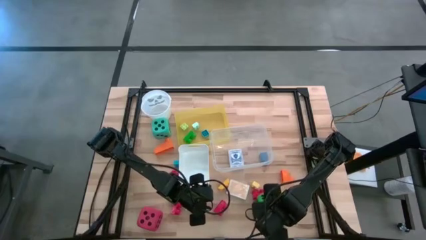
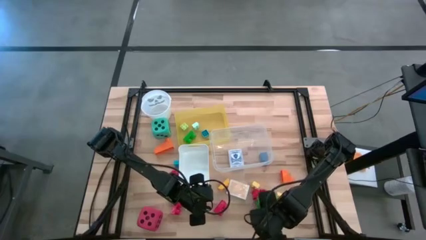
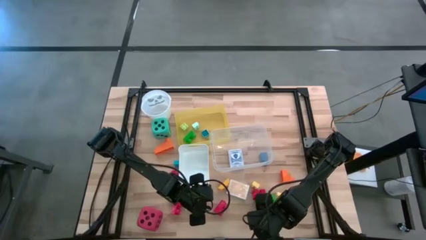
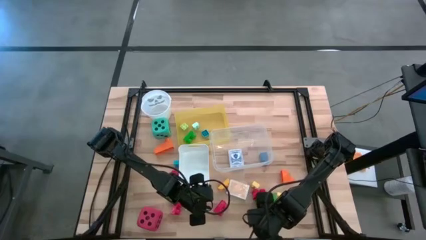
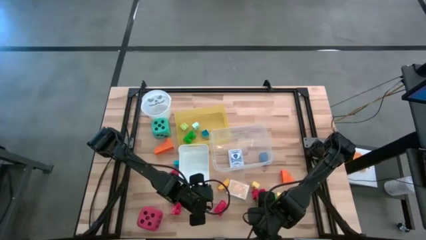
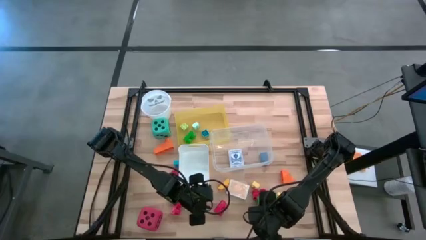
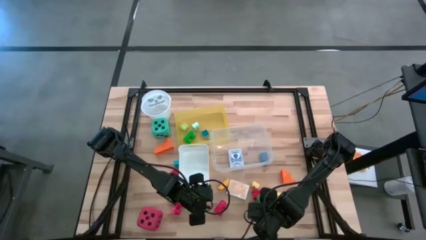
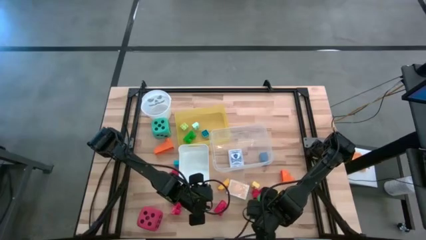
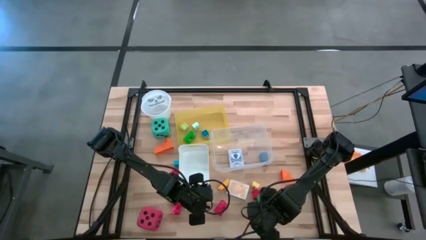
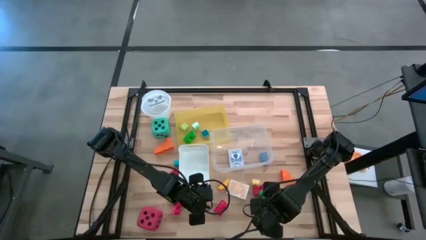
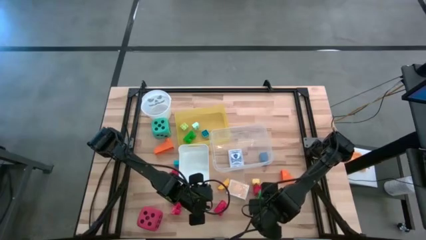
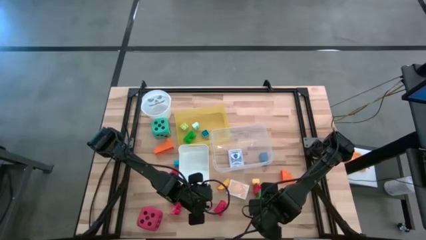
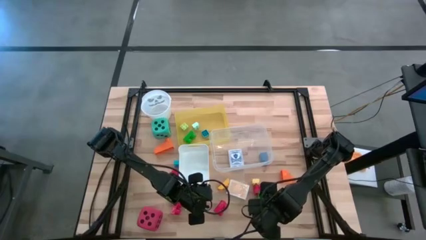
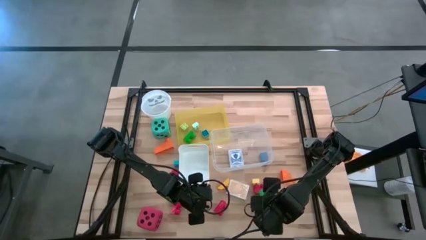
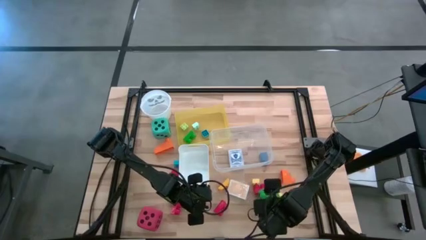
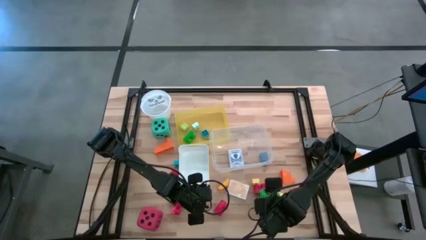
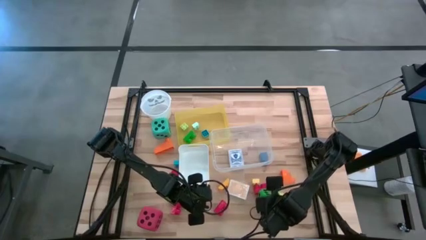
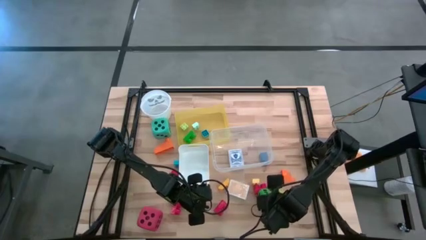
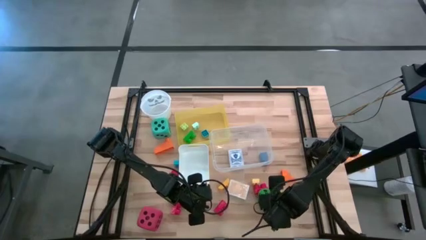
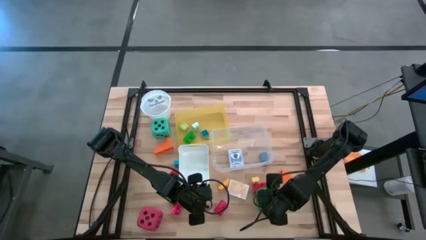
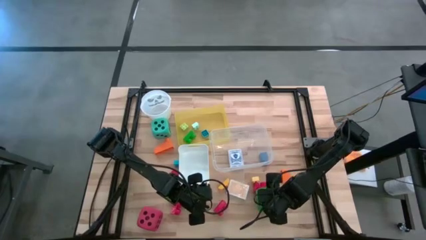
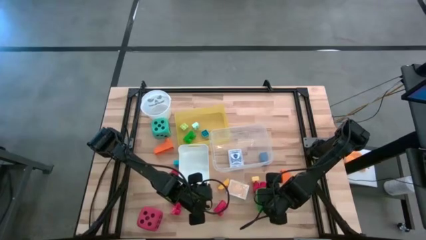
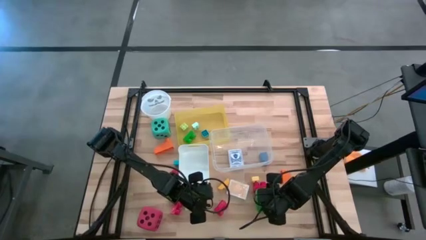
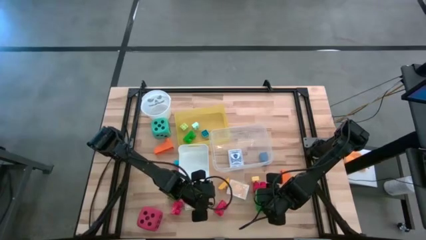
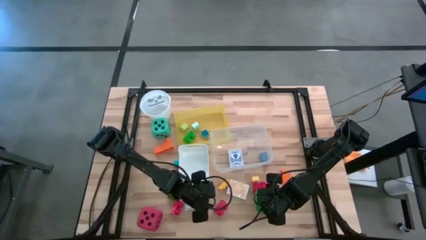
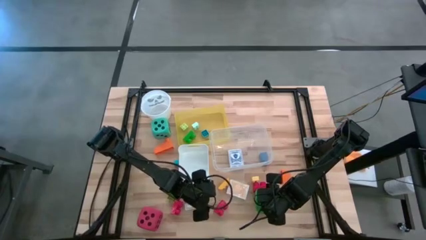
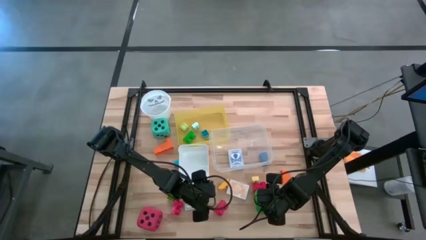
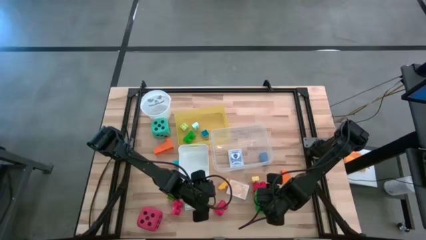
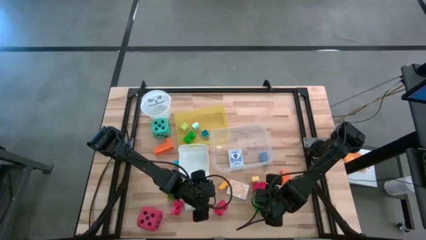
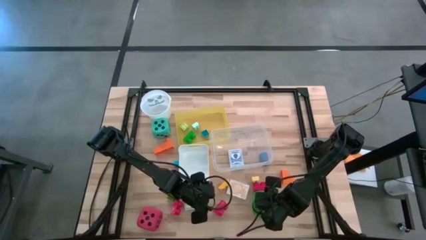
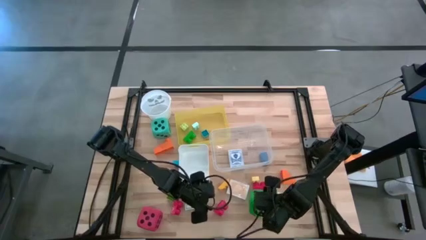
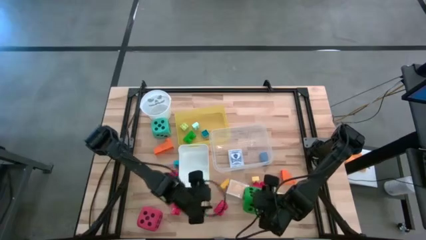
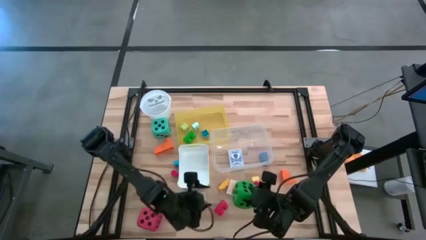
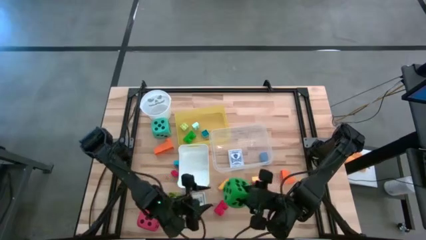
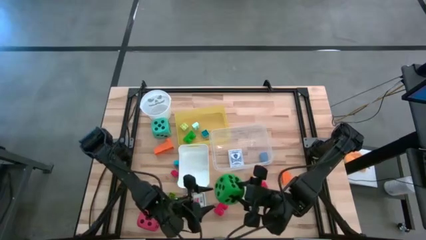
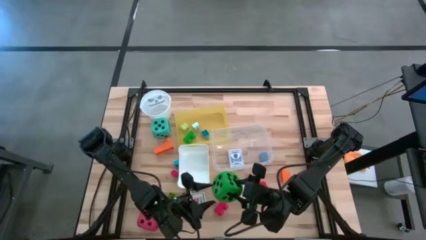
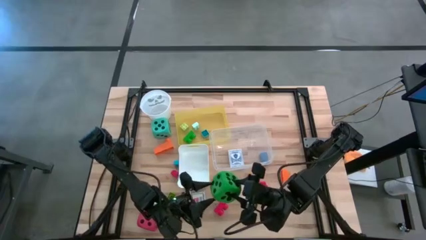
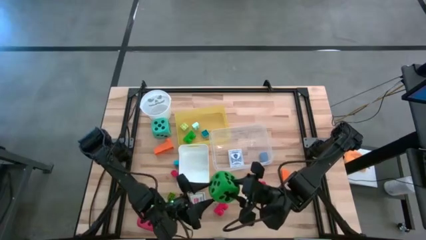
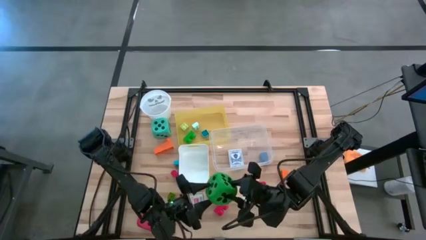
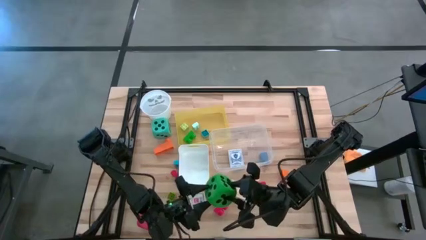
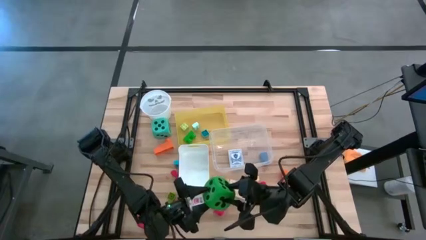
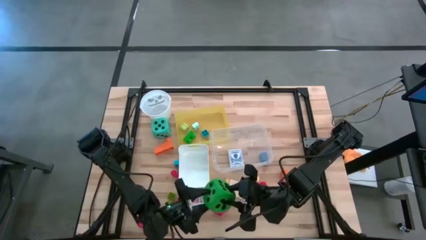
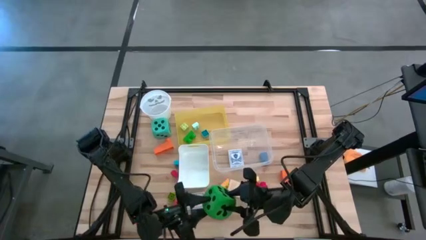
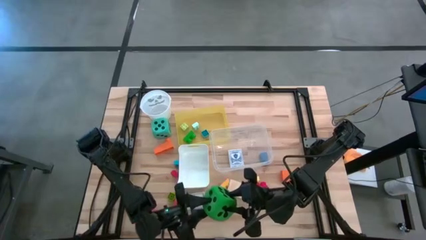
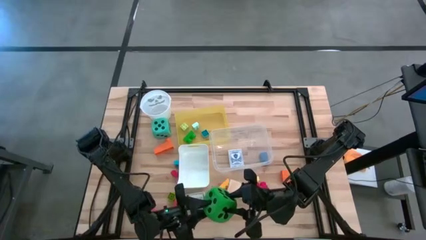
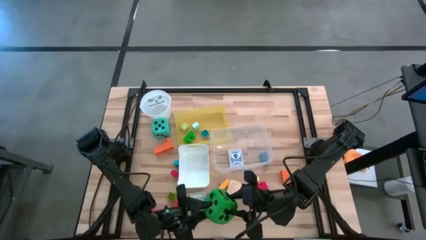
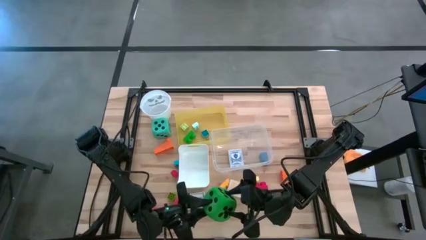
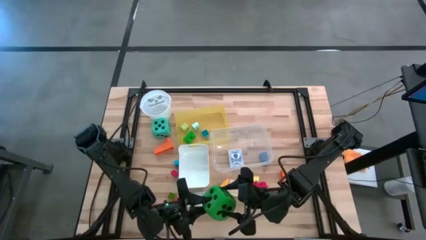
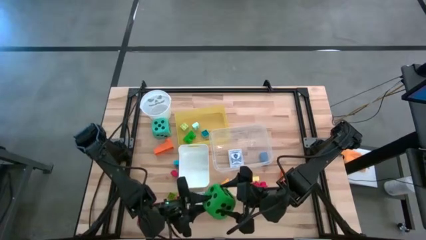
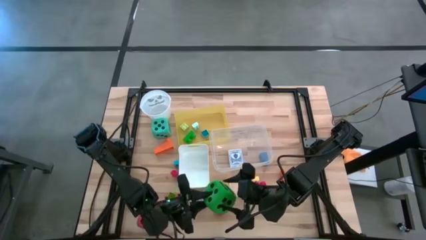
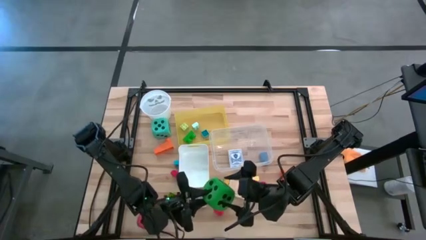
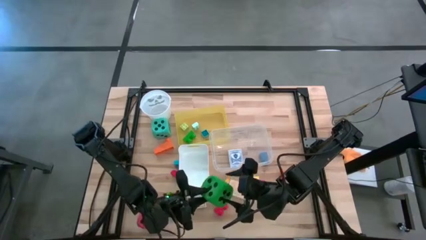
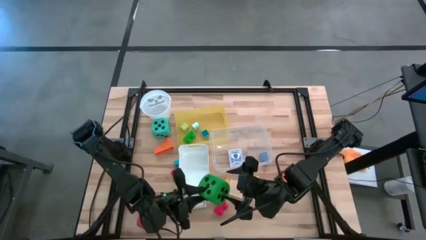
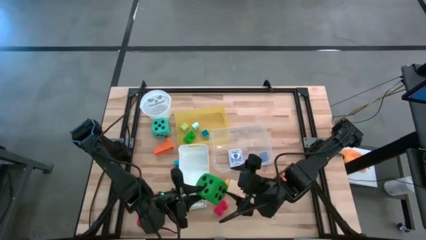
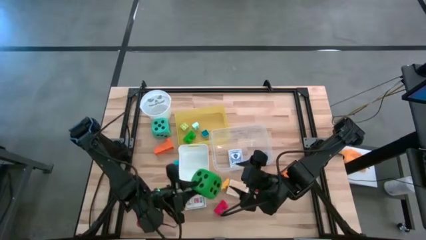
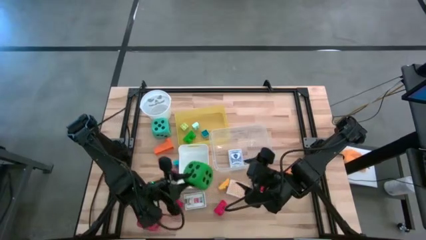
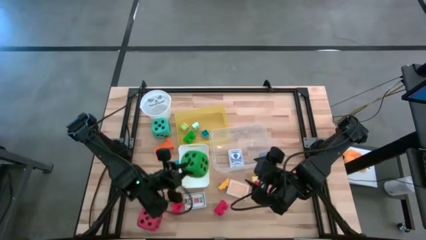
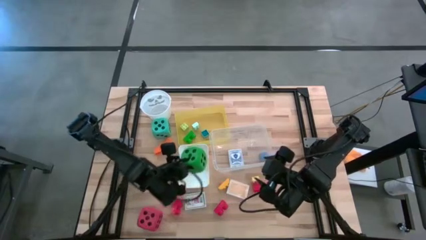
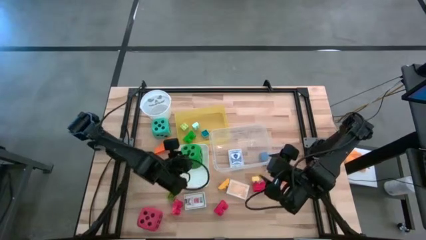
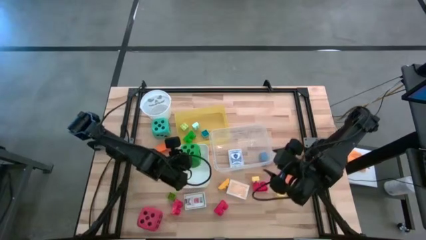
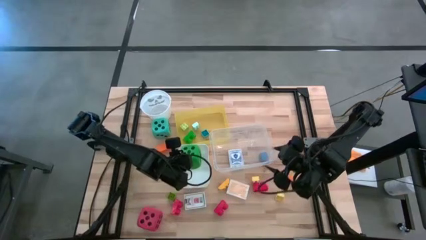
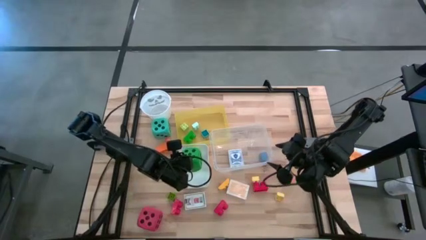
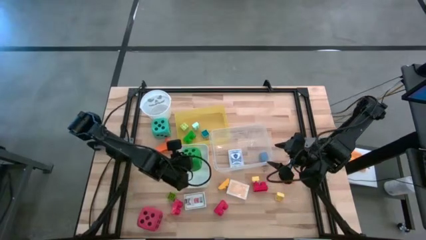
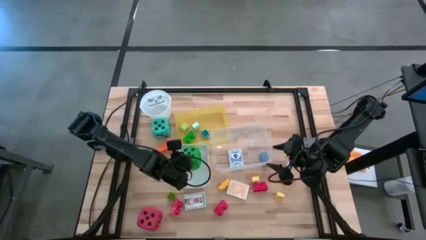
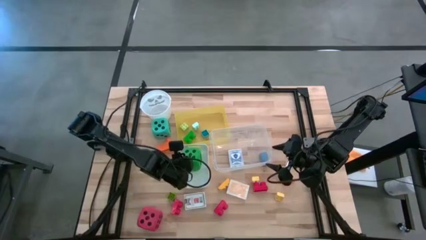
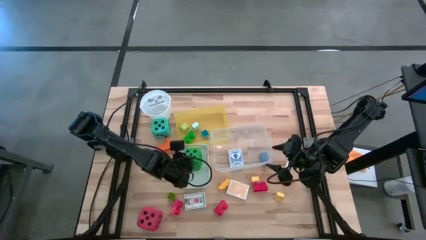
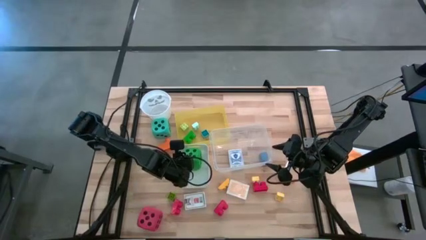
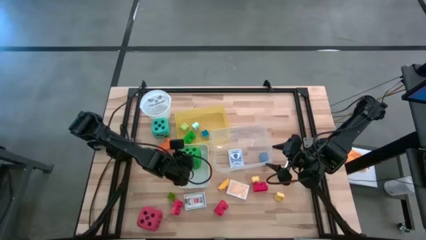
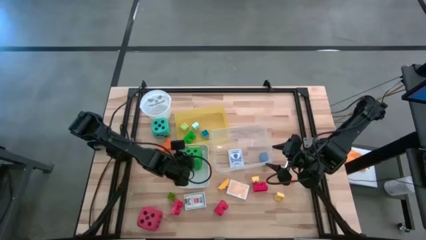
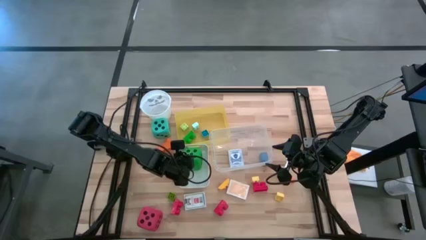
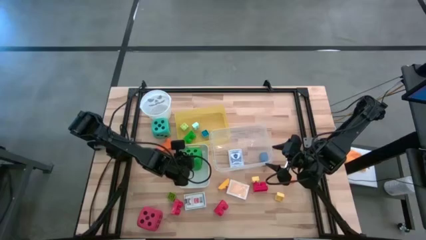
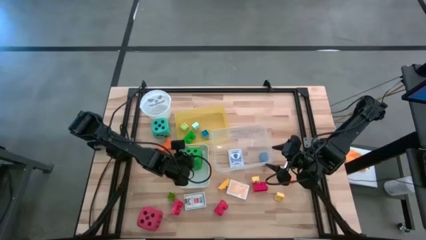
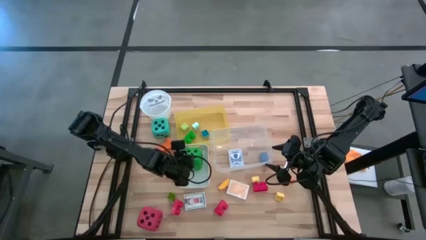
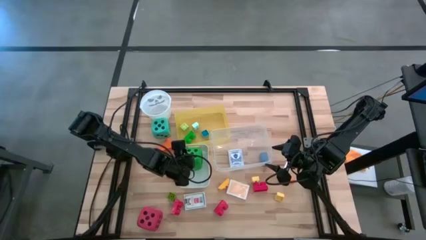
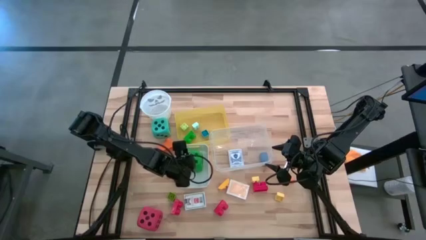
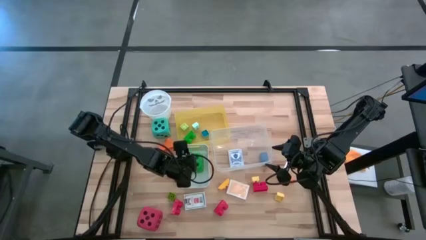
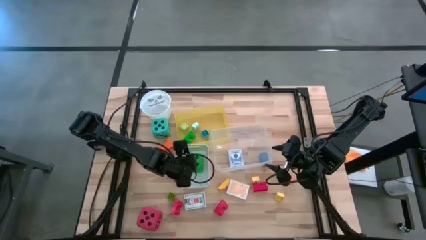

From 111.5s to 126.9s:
Task: Pick & Place Toys
Put the green dice into the white bin
